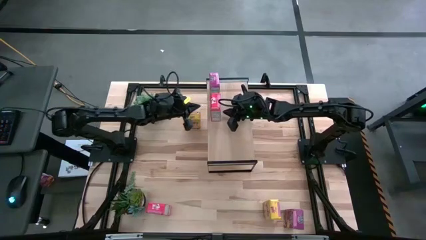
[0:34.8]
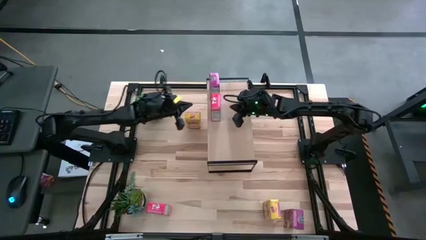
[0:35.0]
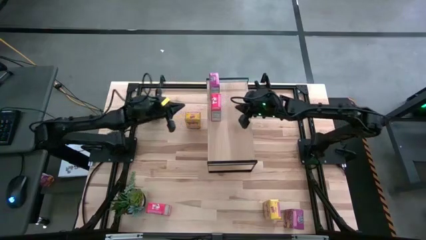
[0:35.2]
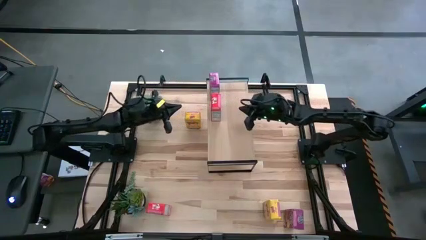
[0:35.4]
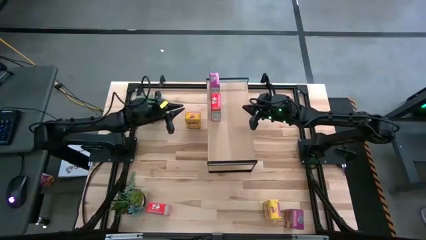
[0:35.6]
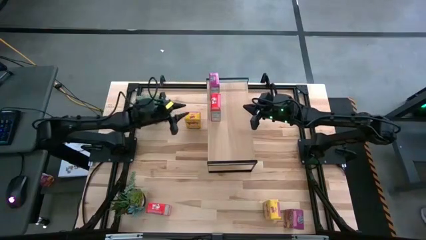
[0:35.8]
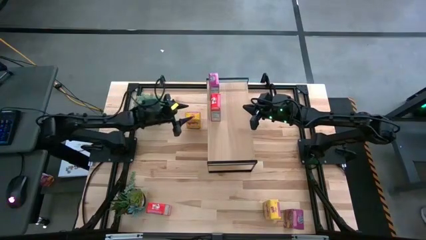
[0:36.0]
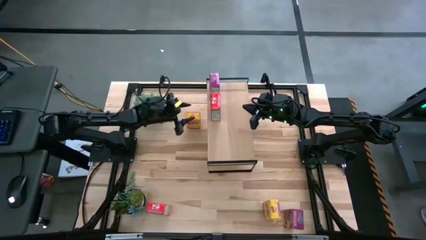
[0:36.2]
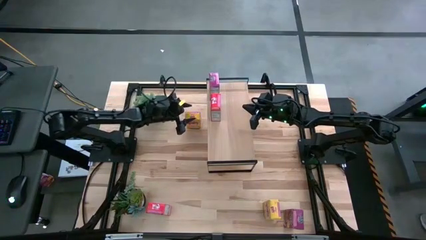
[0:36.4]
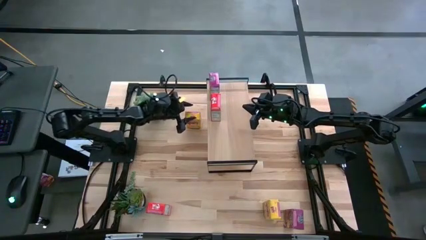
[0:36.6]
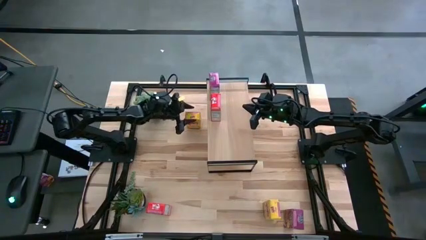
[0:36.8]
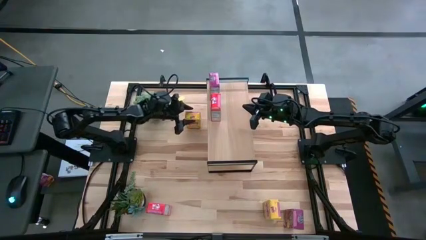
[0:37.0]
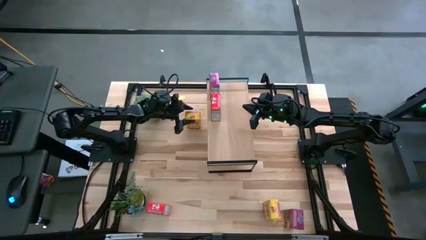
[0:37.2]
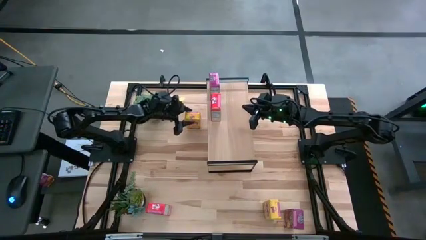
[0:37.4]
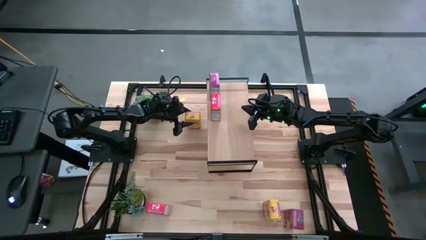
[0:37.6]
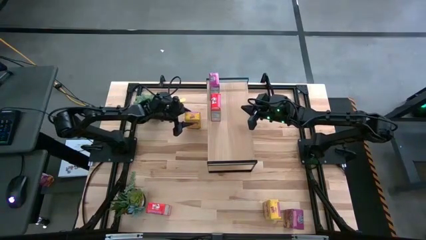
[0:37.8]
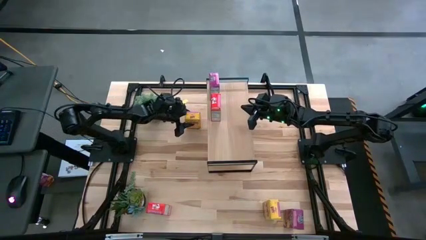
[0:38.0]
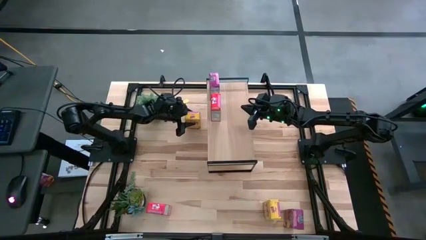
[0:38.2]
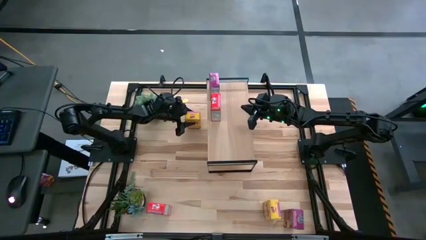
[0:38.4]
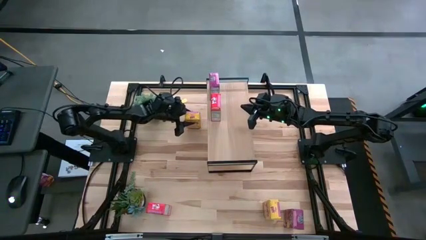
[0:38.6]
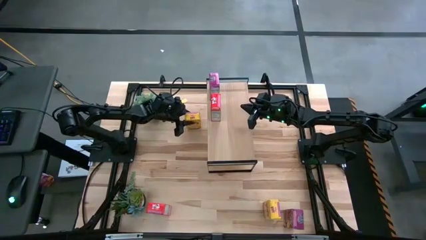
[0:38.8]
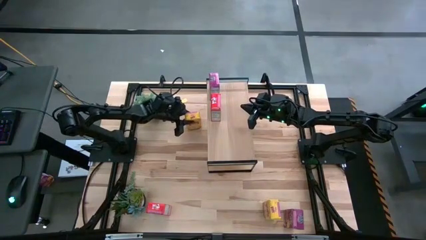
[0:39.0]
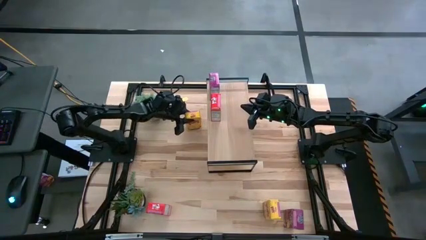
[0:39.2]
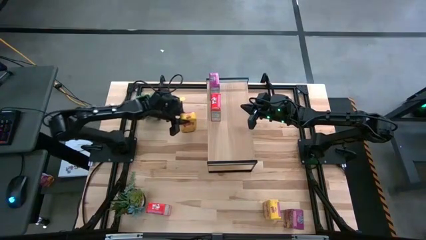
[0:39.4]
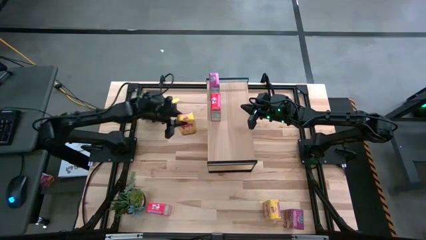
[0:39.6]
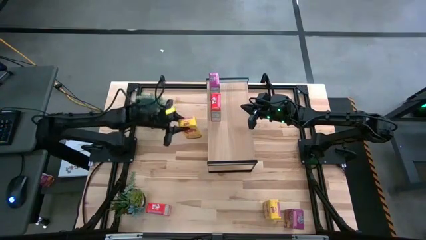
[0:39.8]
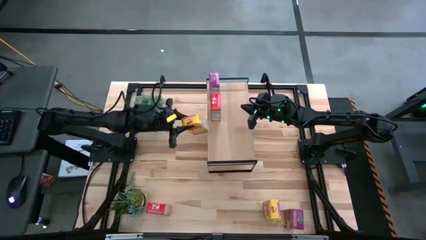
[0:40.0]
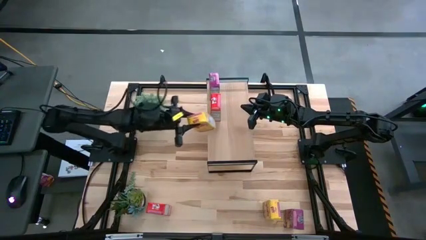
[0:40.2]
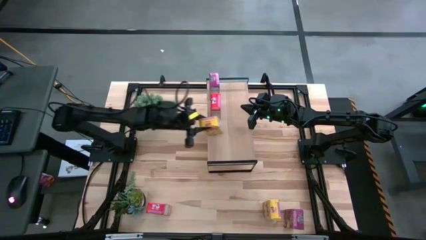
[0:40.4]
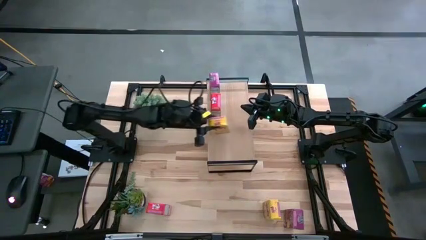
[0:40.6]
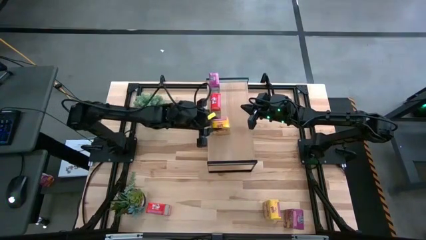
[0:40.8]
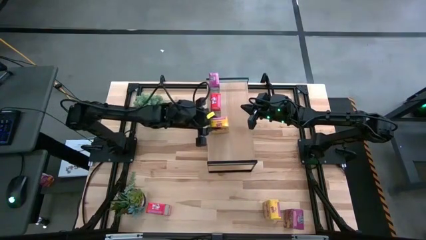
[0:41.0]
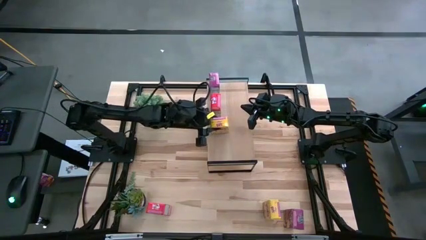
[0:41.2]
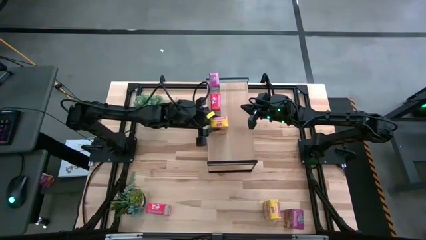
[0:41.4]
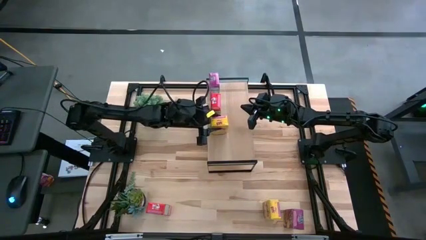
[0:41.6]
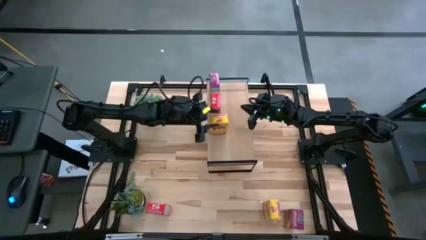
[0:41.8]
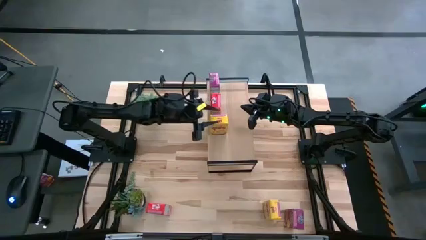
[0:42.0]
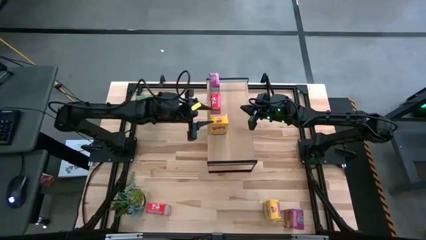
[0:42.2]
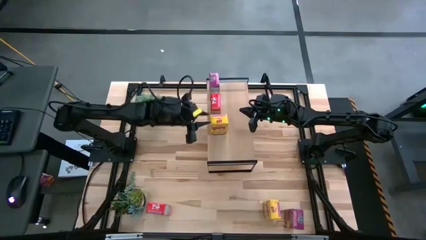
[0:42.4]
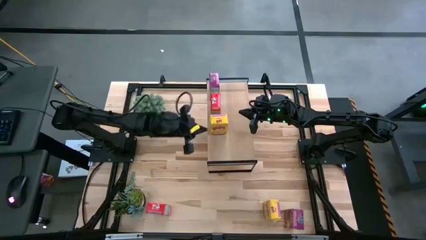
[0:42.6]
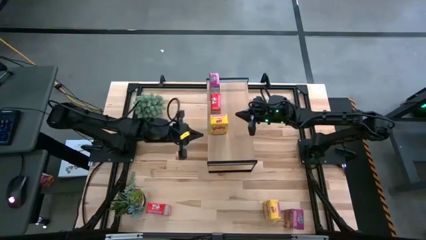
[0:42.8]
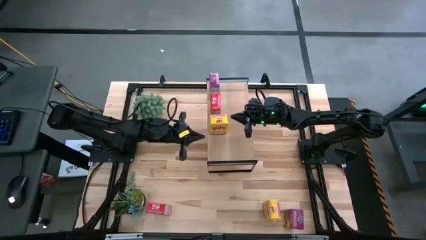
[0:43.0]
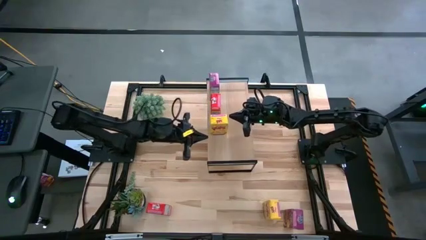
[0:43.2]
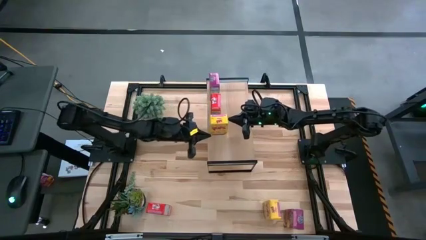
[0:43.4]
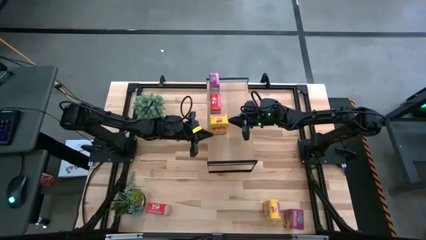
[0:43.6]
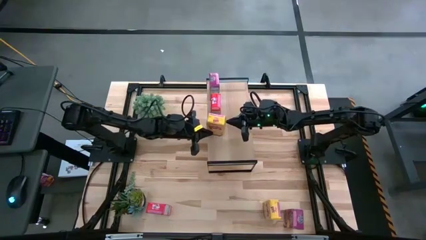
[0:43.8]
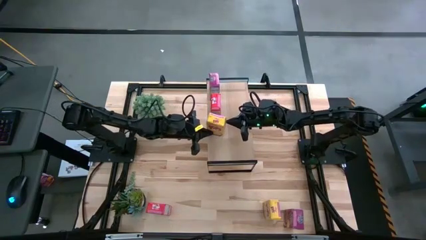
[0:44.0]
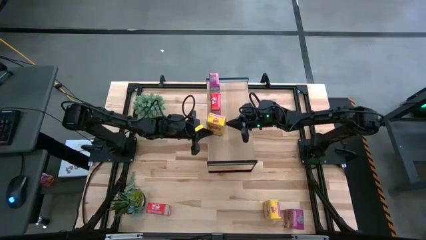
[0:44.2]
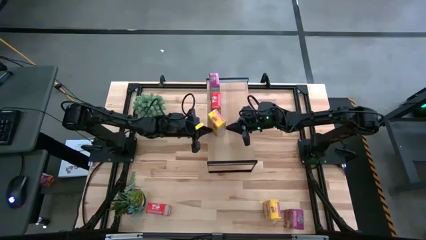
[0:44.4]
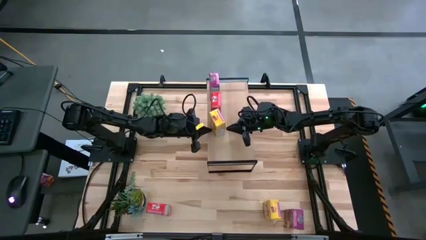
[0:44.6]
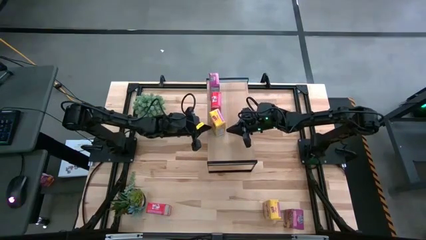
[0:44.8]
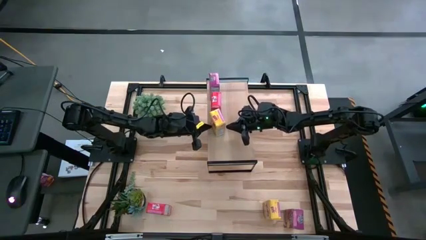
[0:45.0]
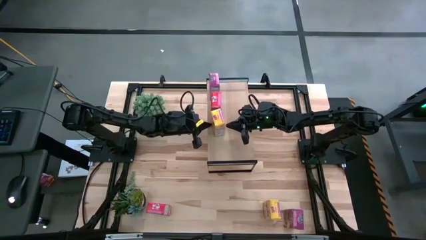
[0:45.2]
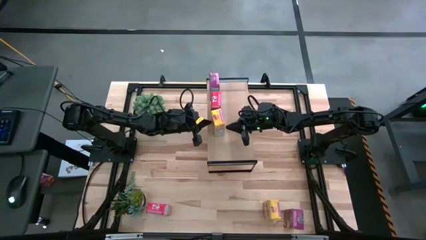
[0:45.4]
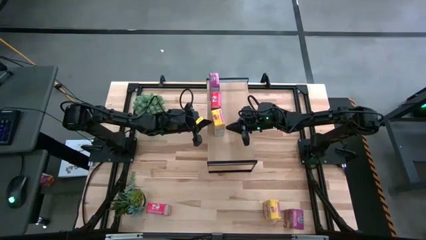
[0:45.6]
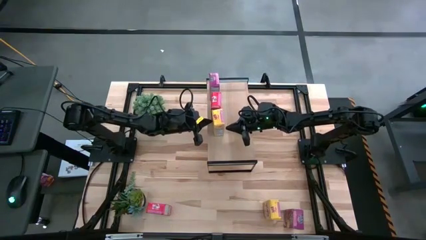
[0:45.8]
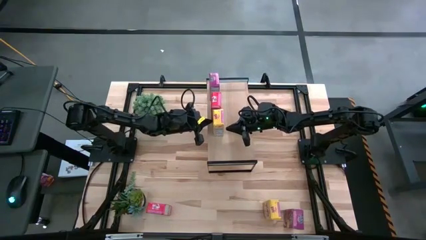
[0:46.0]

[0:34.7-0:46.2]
Task: Stack cereal on shelf
Put the top yellow cereal box on the shelf
